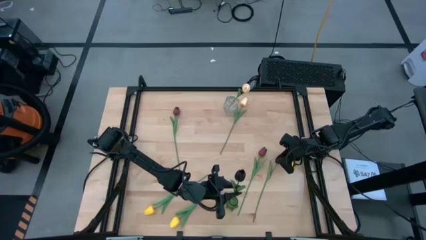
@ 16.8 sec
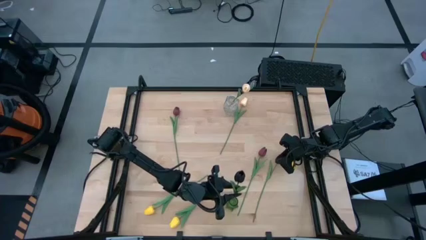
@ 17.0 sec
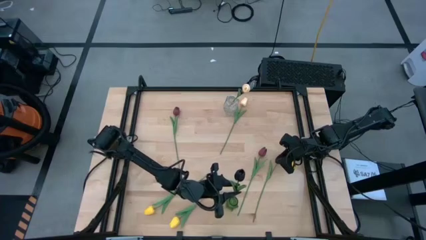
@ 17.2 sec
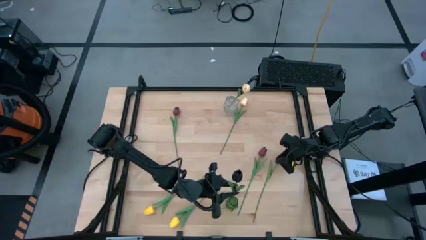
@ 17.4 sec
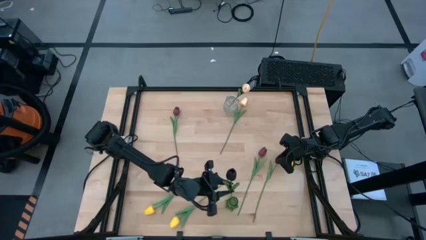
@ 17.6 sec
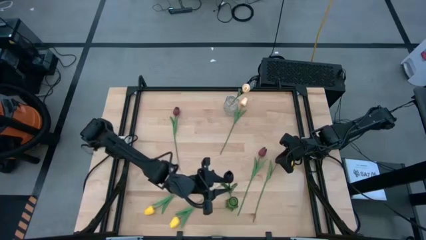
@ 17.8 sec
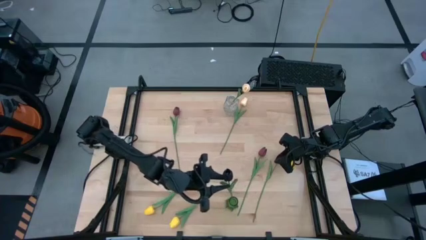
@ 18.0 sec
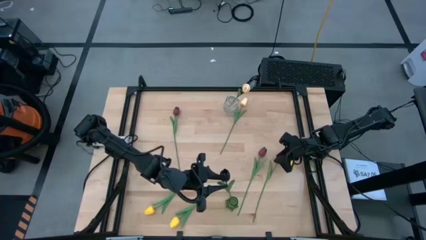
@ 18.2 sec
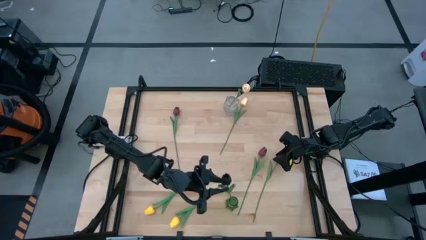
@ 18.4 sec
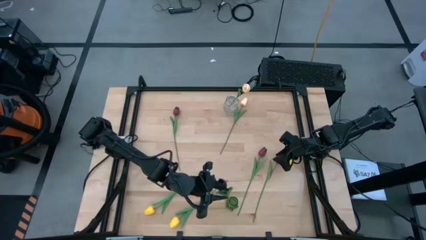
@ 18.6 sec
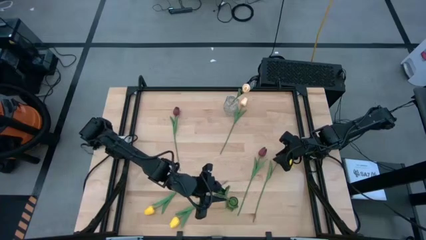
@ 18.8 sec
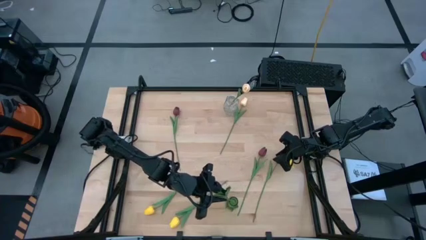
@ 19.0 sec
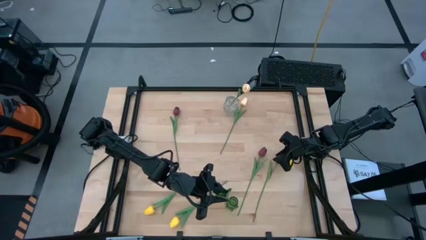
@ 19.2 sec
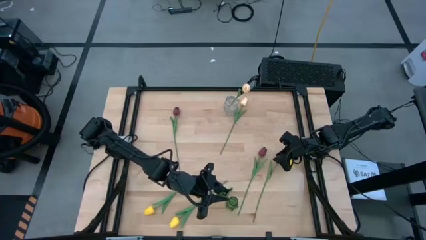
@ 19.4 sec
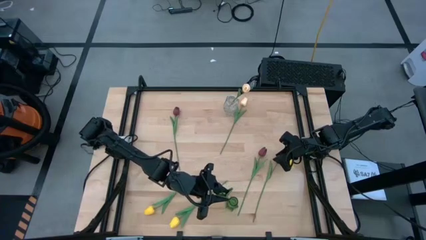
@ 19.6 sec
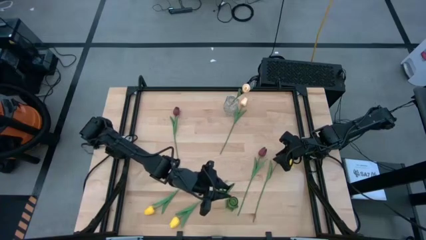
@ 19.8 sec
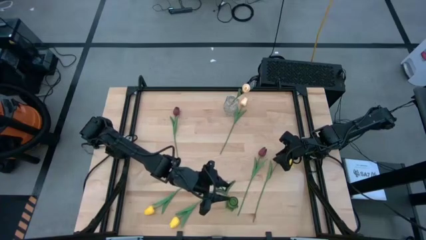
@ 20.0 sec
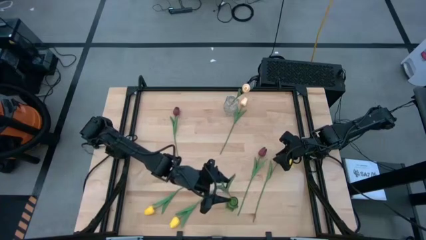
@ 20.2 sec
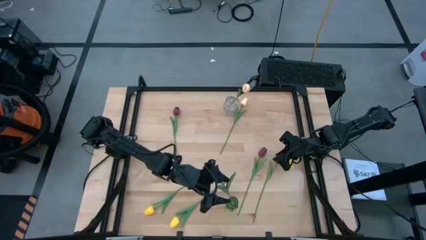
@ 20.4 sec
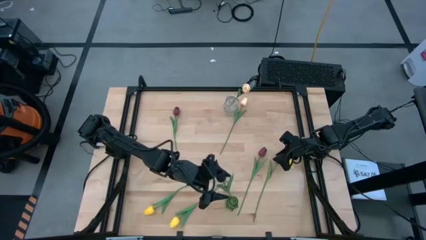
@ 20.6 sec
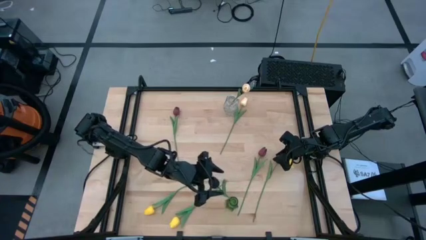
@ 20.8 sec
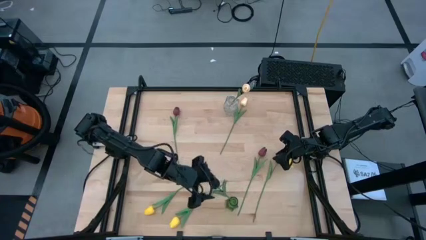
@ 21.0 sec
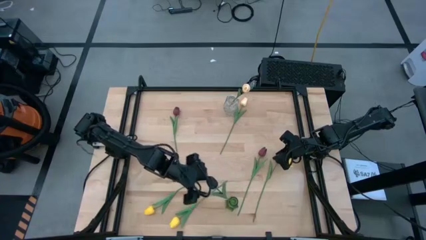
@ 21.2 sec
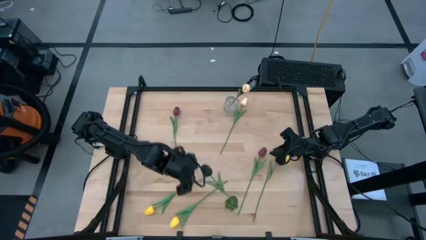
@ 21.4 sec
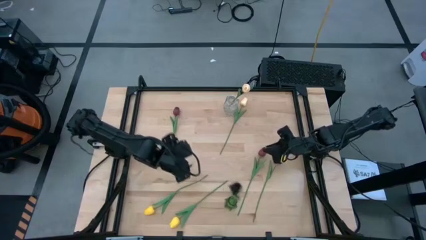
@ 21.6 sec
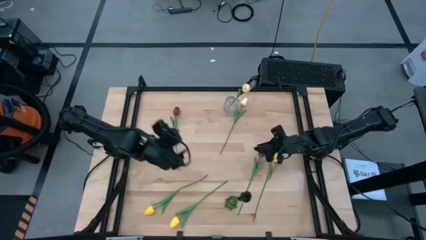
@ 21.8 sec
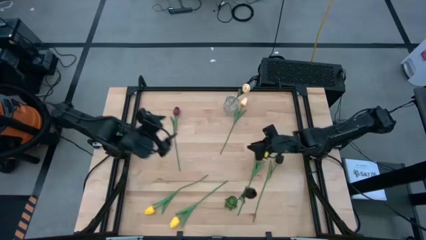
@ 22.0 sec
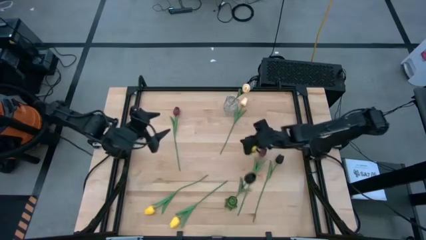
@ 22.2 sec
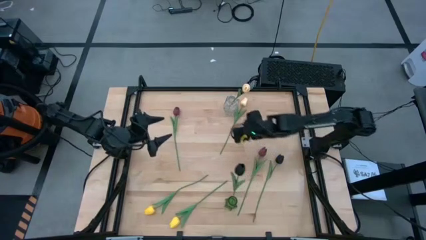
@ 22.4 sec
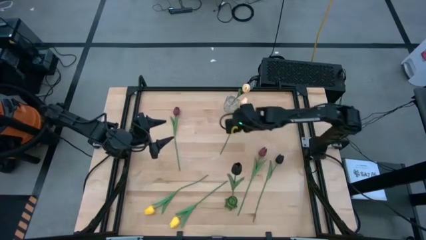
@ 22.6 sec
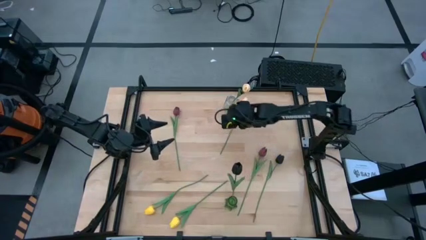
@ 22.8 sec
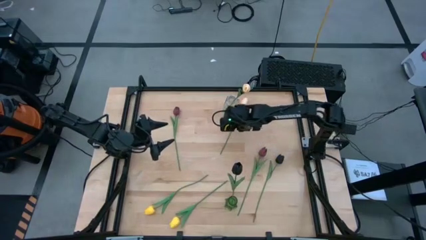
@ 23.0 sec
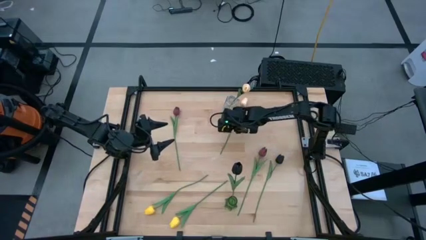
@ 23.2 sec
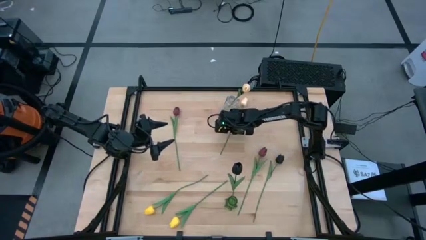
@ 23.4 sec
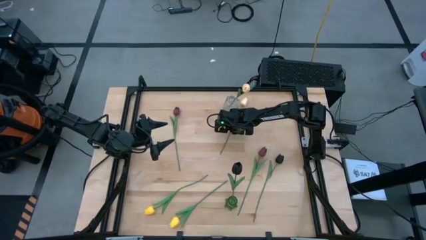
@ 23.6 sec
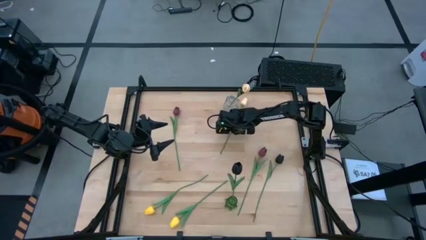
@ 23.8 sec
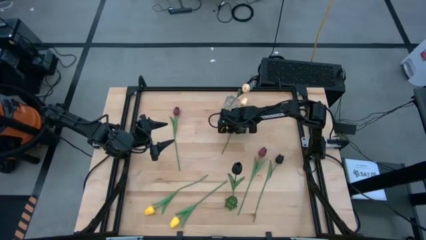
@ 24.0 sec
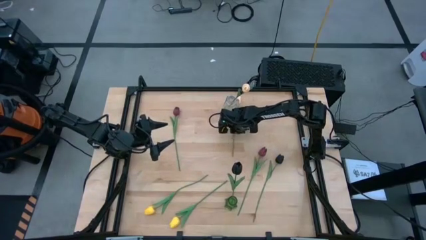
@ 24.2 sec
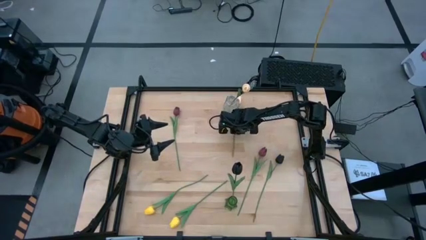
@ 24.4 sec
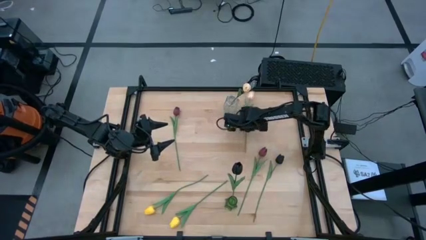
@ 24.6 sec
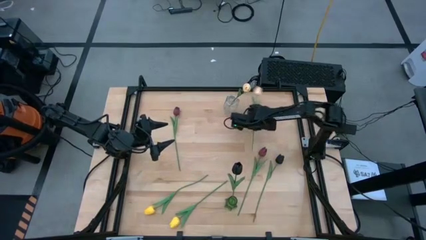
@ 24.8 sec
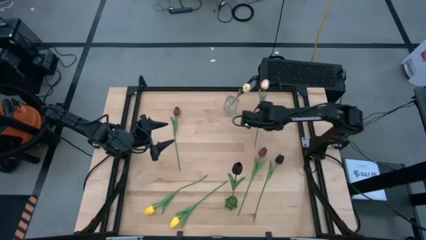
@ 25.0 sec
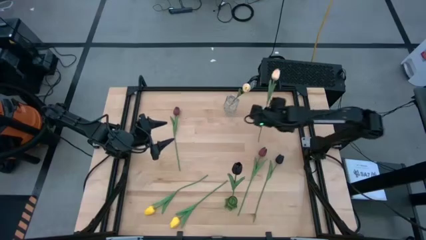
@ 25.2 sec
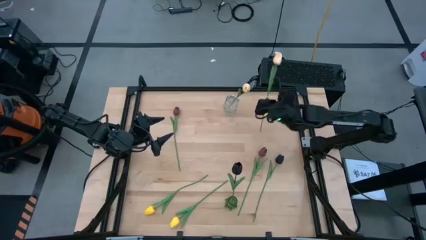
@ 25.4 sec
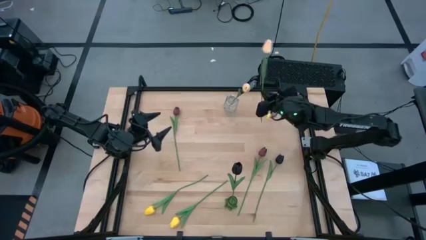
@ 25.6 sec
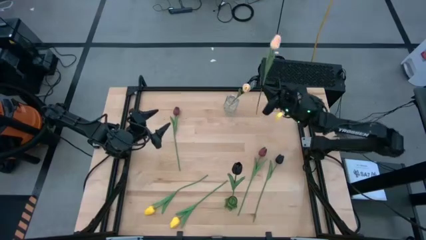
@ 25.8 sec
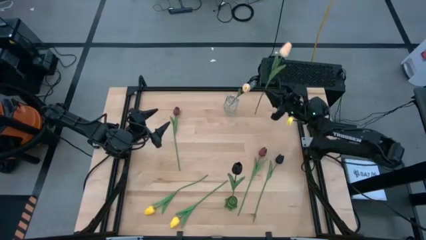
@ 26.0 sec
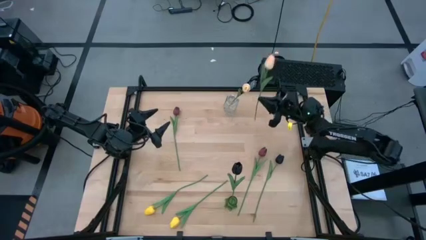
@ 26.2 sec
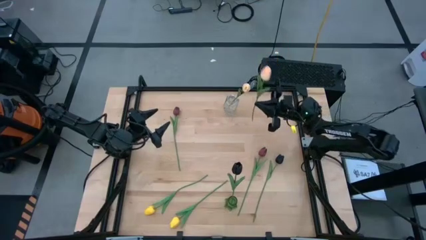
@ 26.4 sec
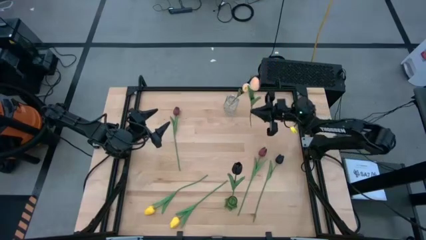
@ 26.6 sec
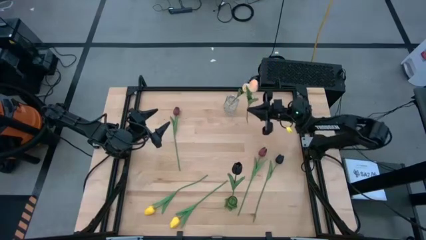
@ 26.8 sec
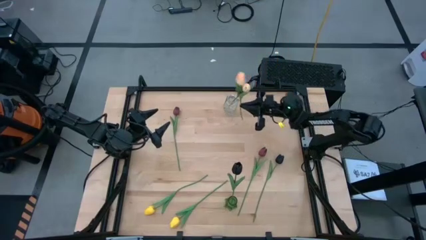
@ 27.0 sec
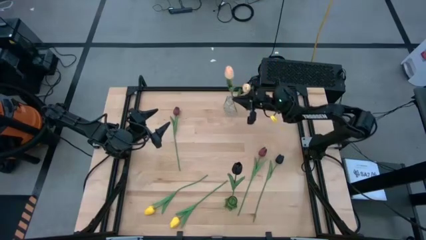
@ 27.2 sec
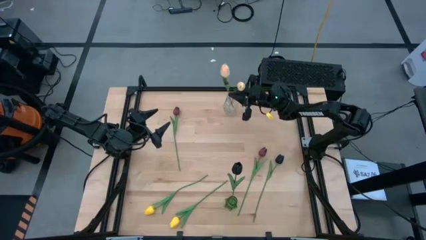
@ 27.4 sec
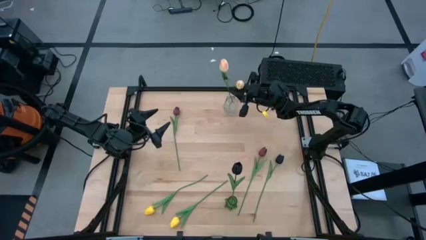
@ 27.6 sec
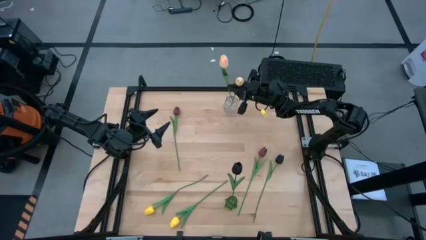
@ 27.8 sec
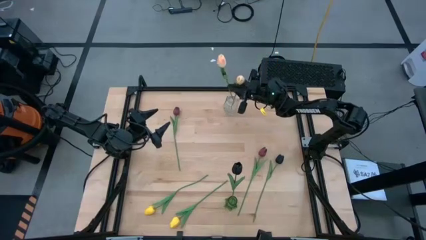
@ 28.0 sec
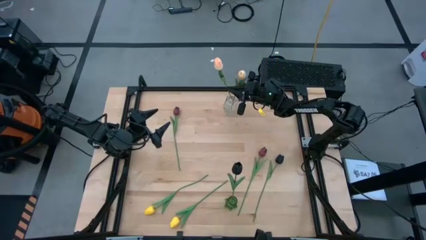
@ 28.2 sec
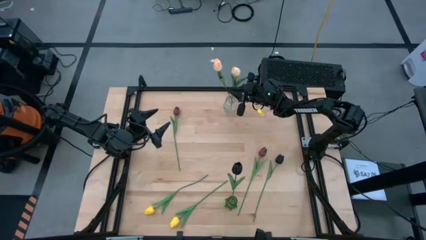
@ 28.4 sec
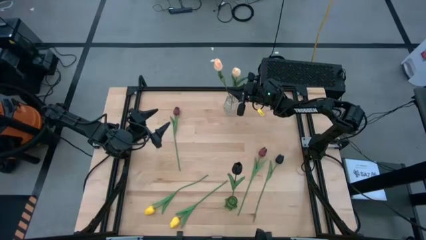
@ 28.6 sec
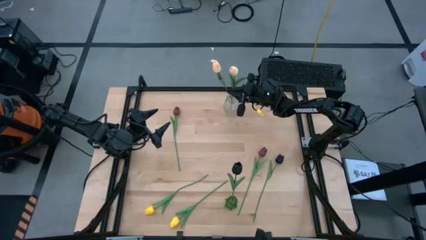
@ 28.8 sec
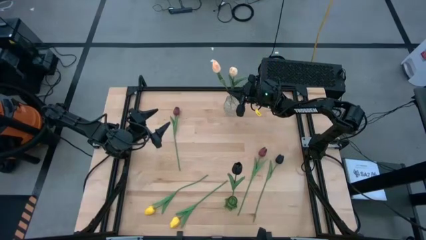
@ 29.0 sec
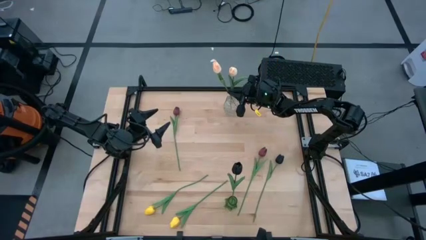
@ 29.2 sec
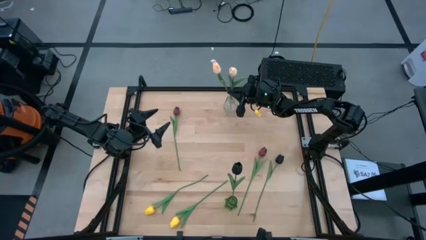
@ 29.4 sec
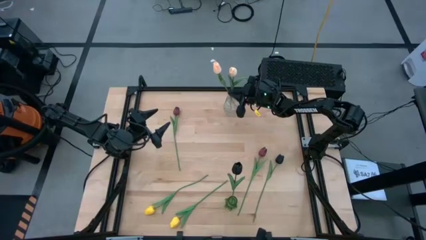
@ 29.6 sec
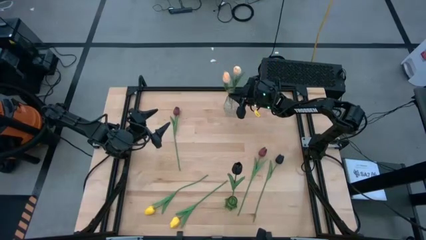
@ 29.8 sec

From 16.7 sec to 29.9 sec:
Task: Sort flowers into vase by color
Put the peach tulip into the transparent flower vase
